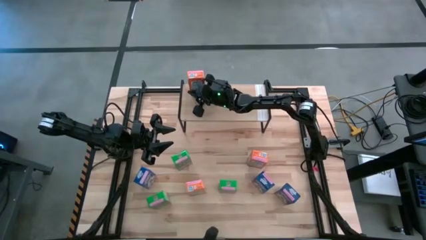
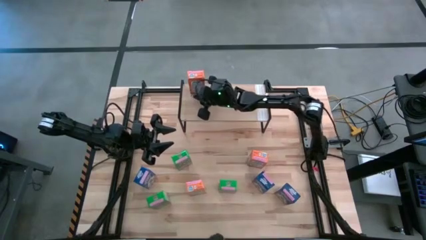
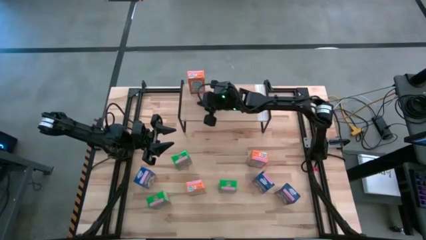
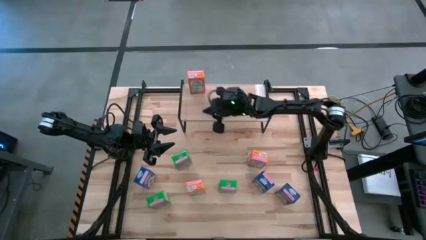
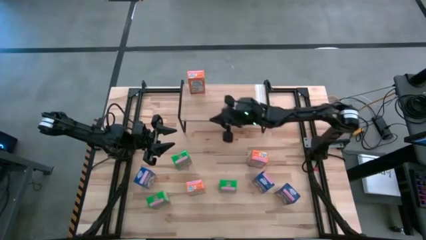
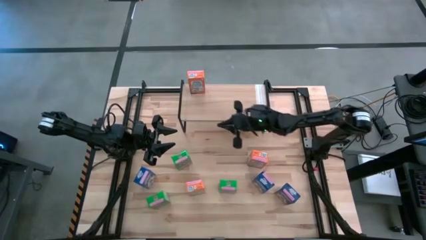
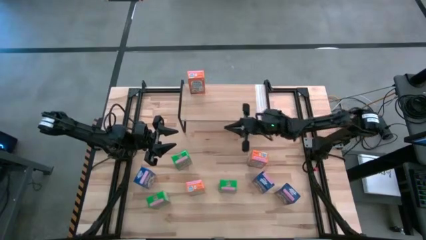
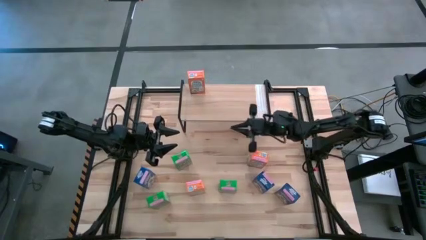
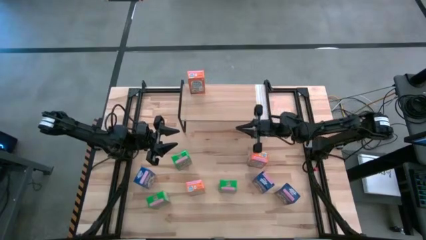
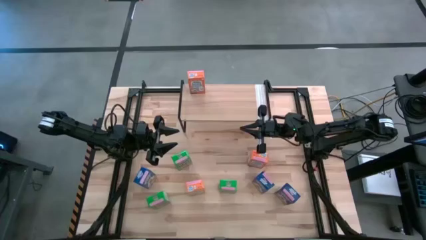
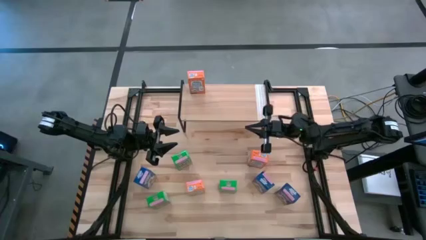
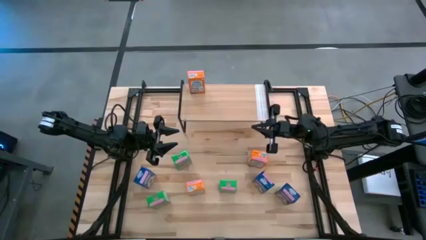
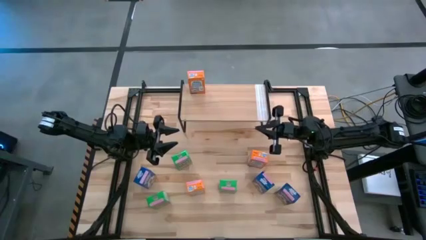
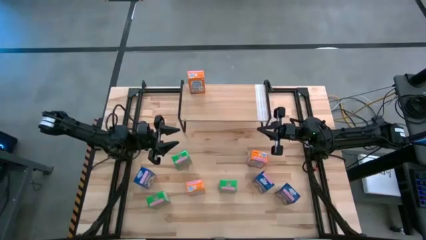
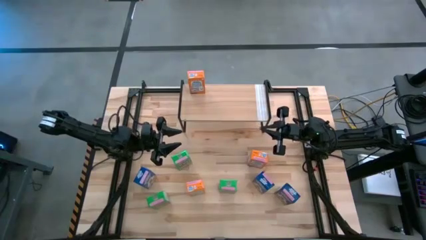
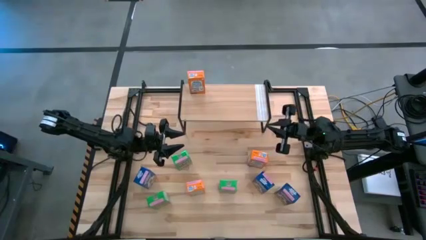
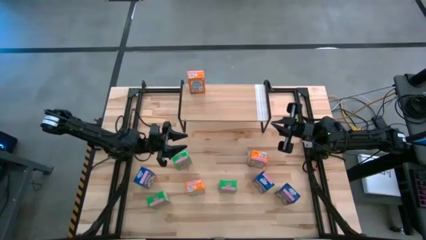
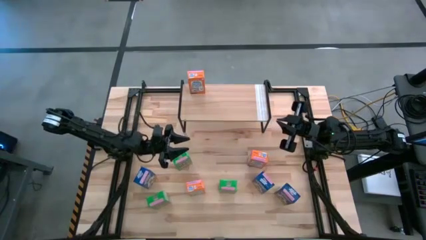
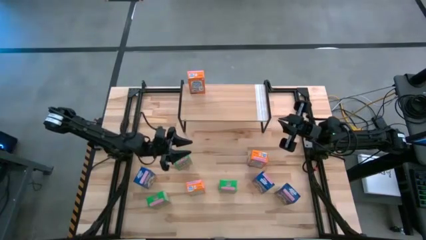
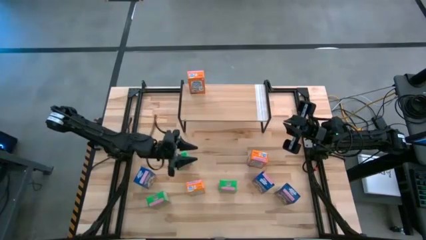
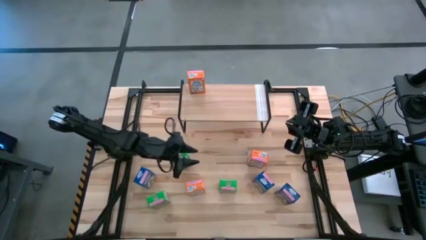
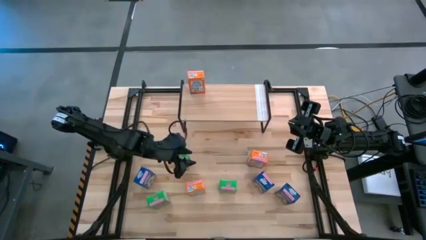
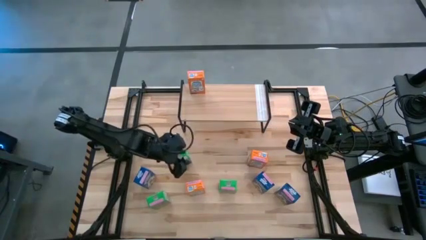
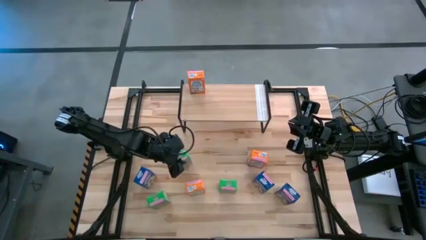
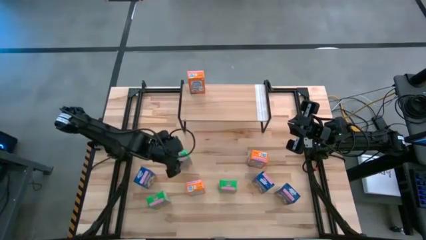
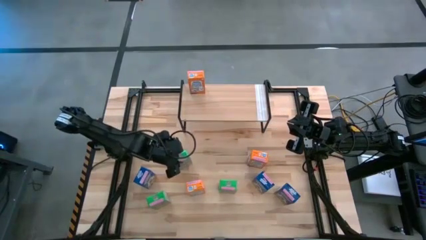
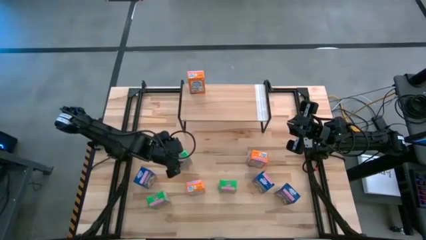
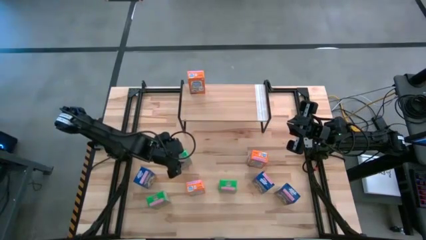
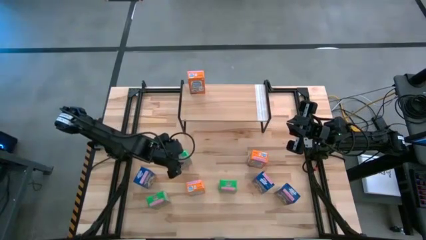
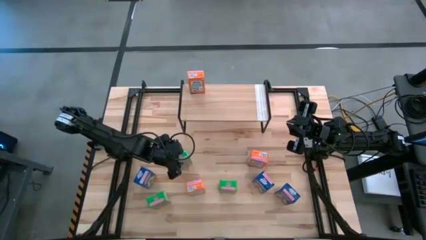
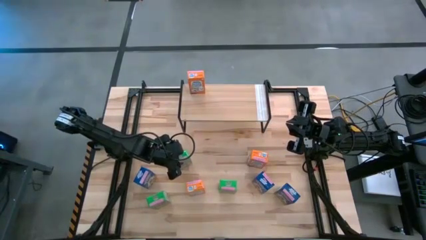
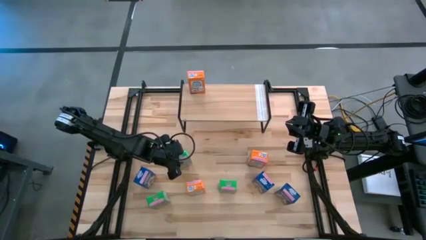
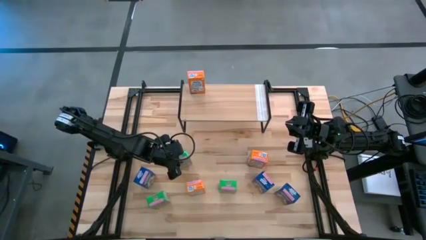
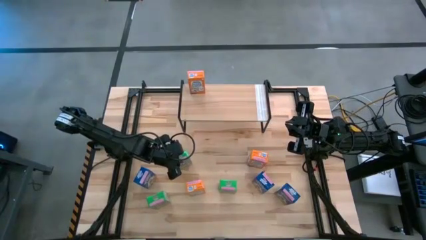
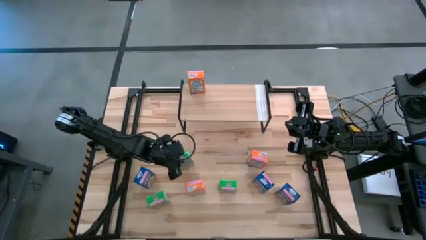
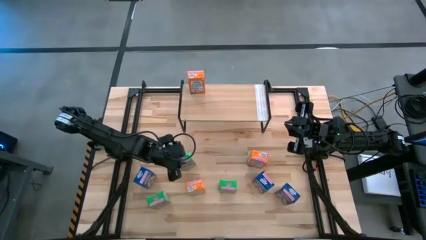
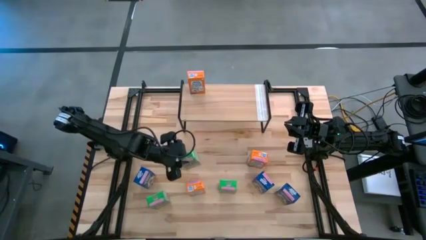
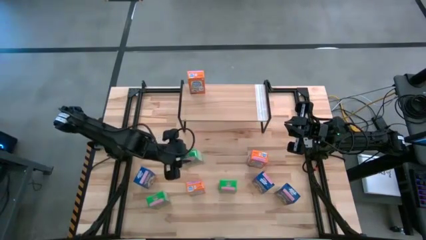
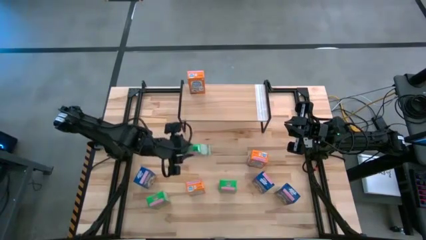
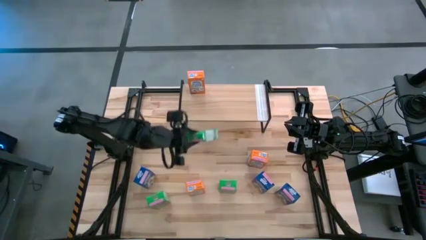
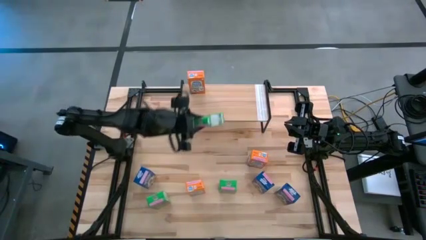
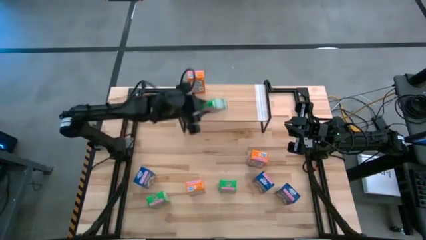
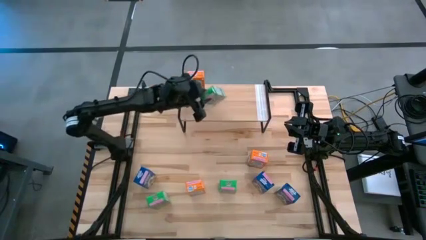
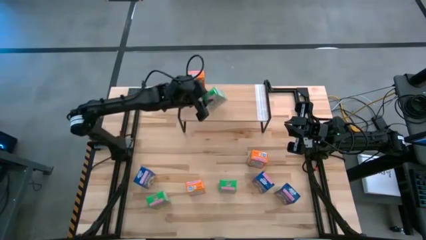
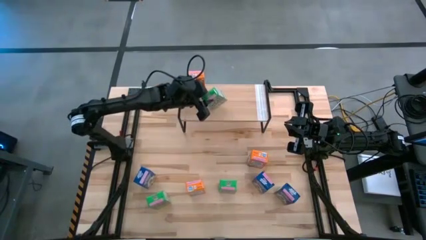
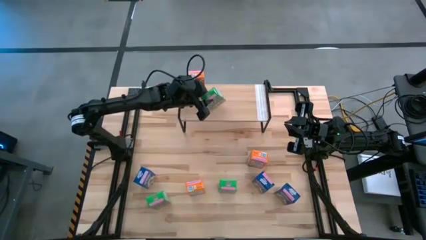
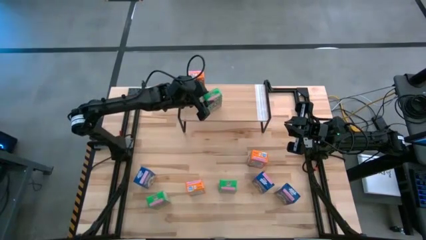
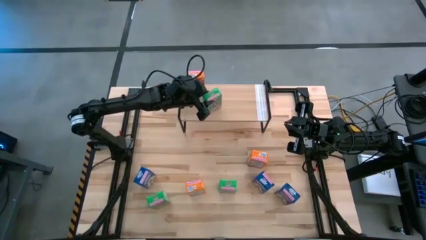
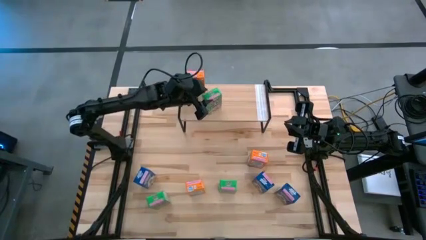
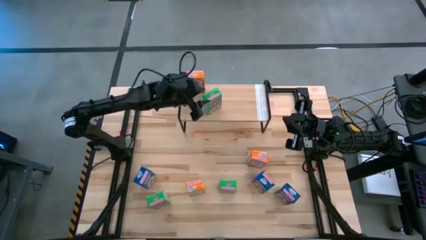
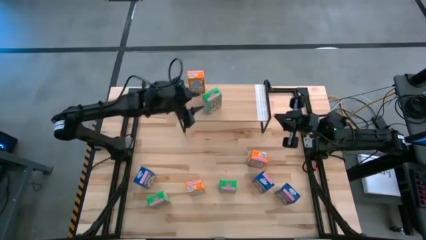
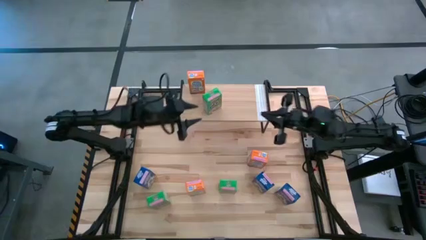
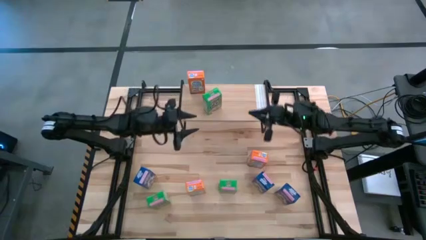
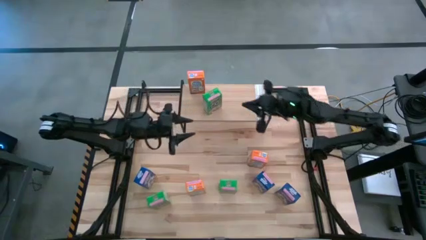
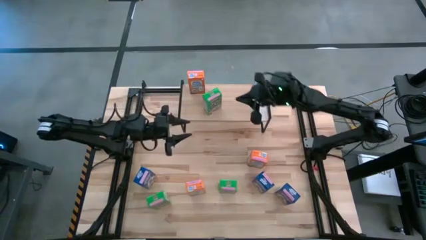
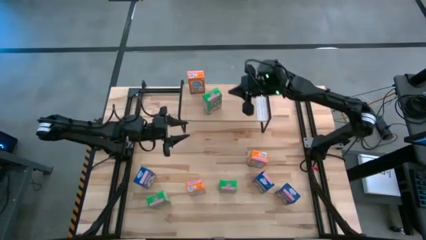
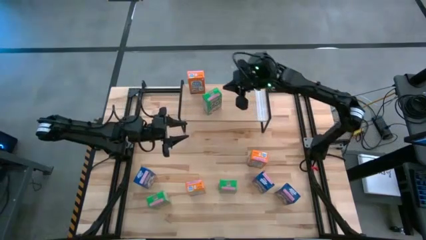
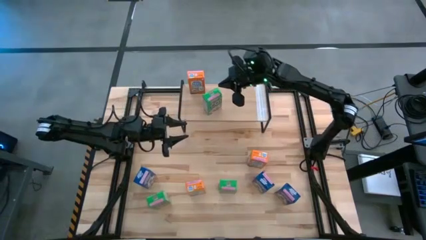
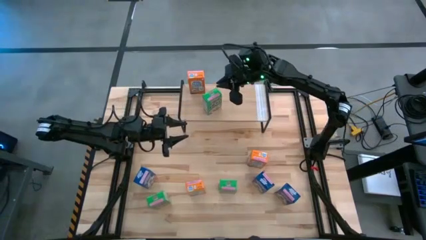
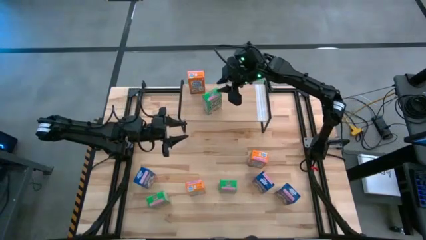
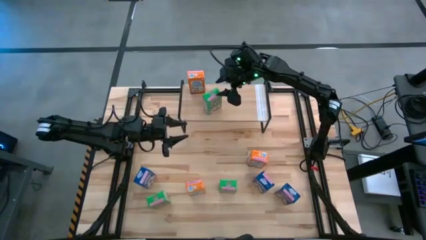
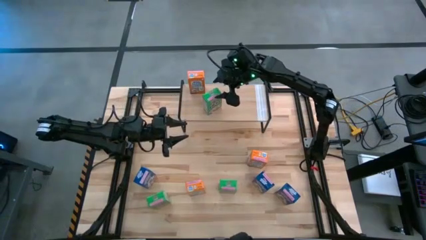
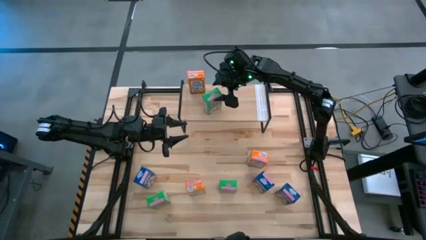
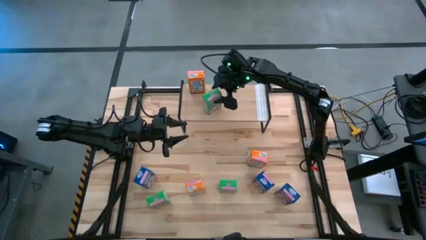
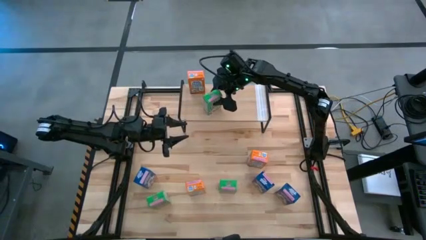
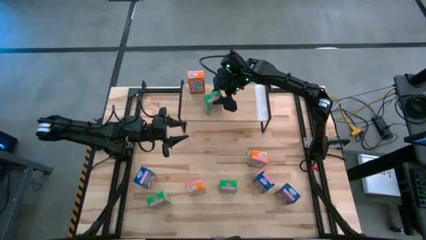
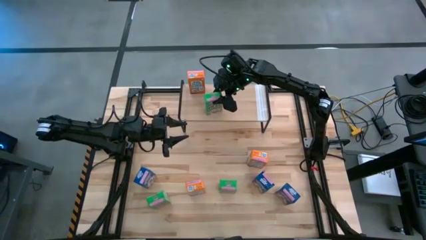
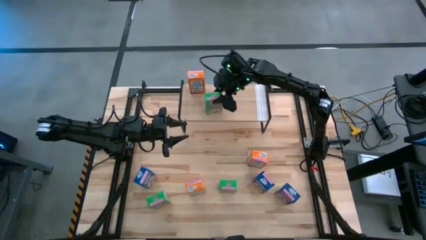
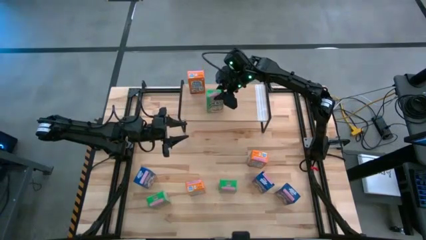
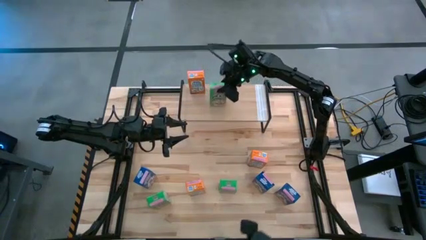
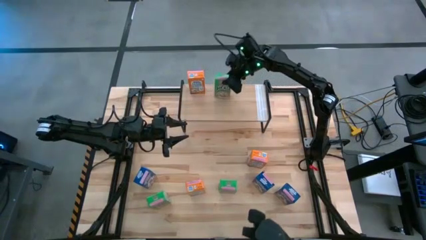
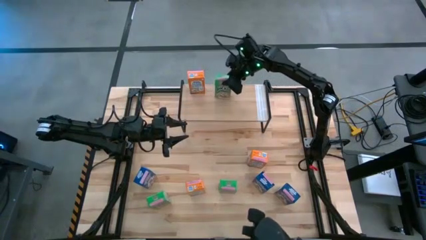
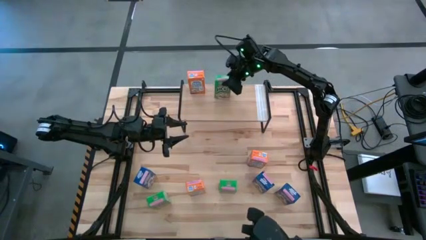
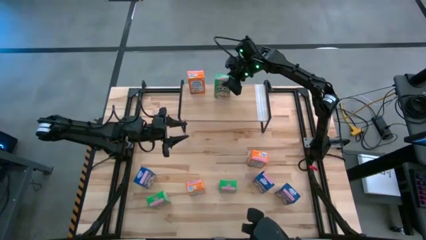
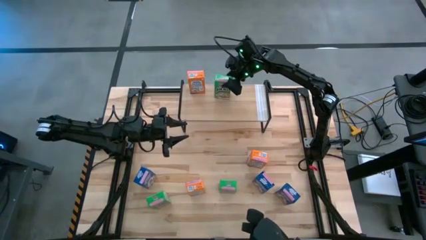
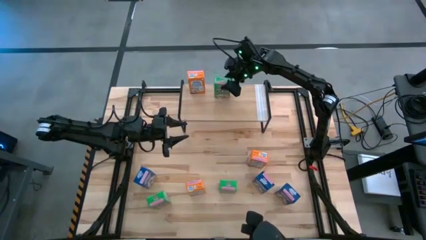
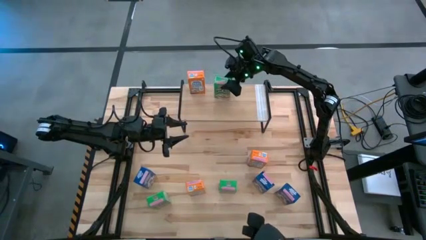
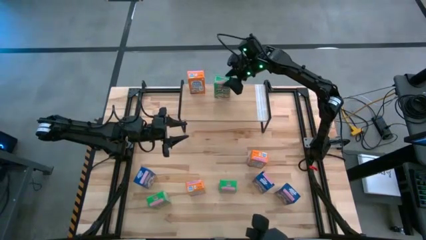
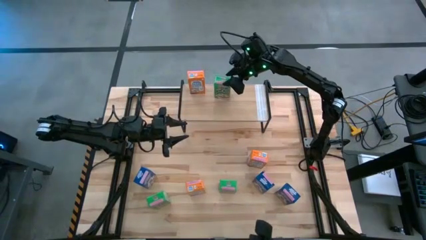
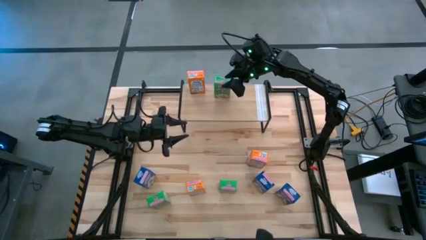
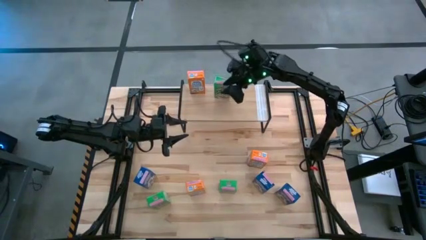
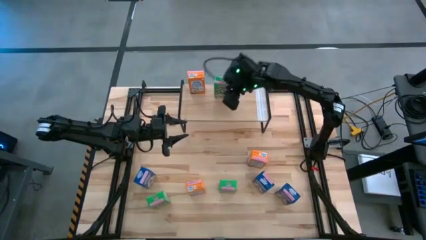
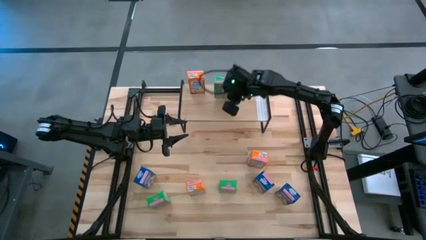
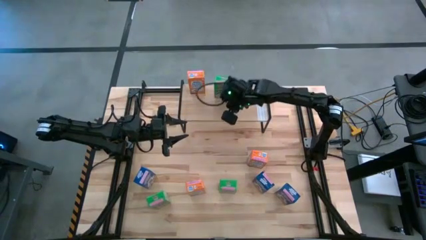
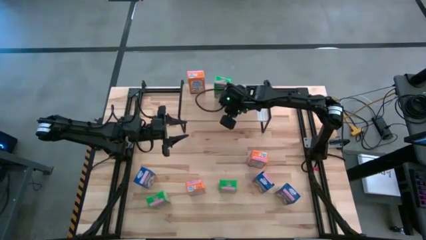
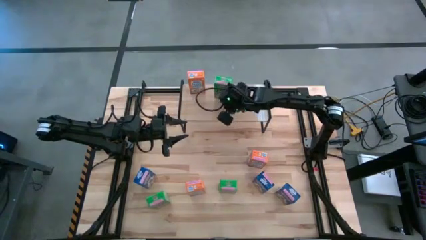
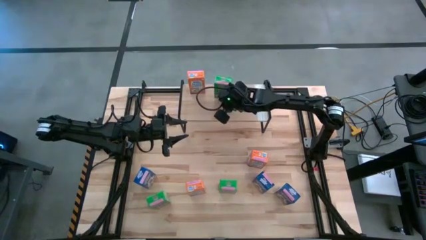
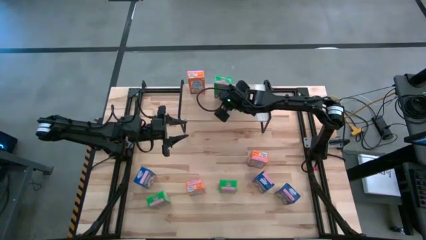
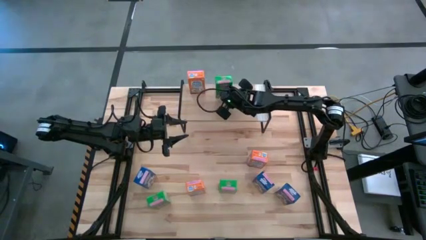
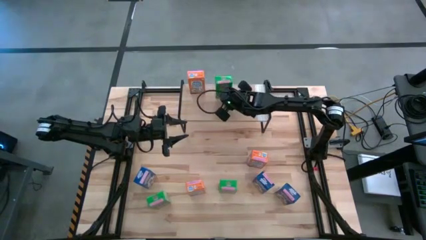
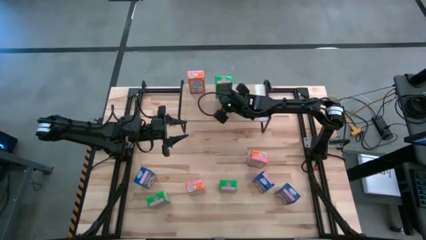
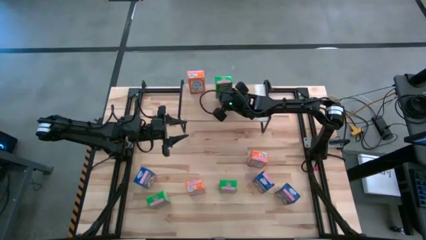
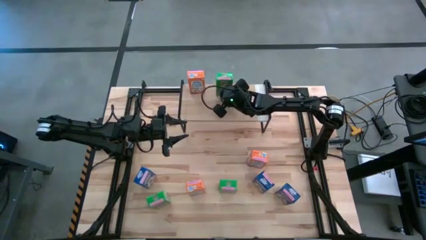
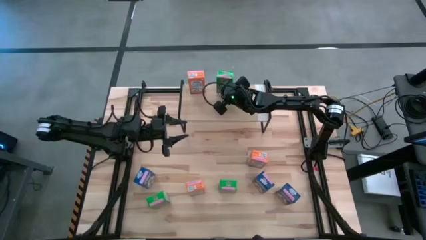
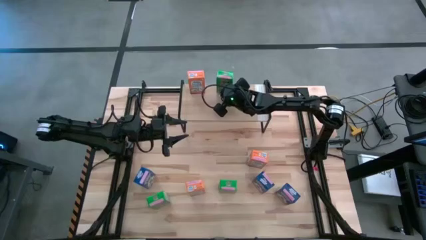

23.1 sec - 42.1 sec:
Task: Stack cereal on shelf
Put the top left green cereal box on the shelf
